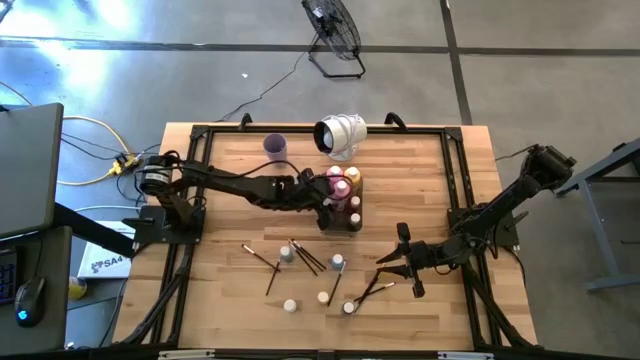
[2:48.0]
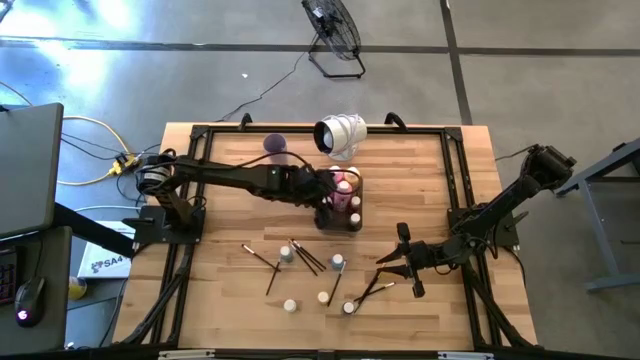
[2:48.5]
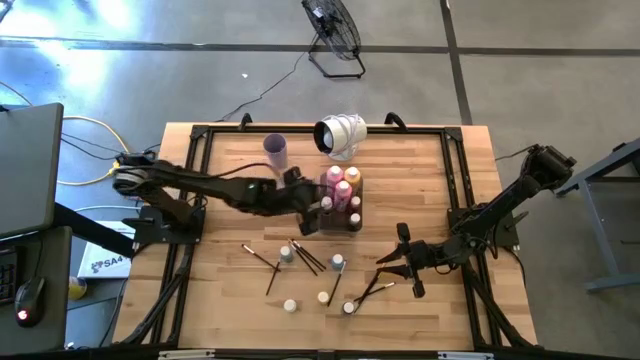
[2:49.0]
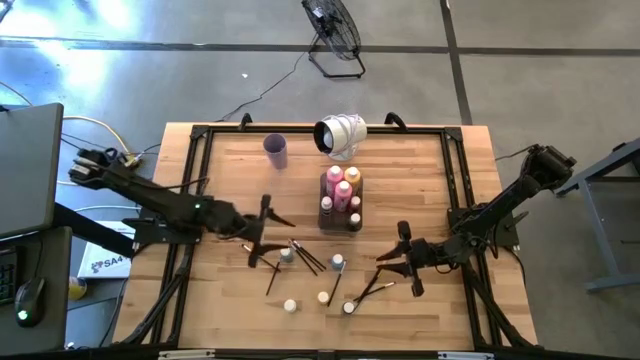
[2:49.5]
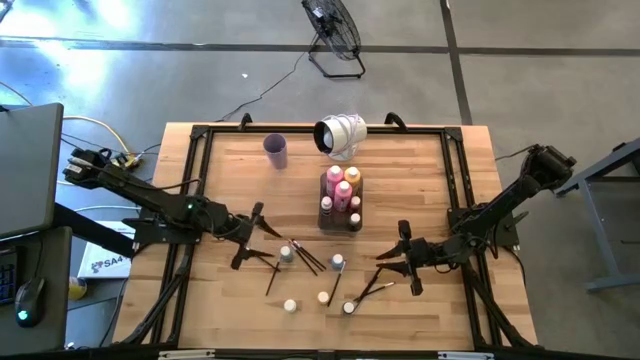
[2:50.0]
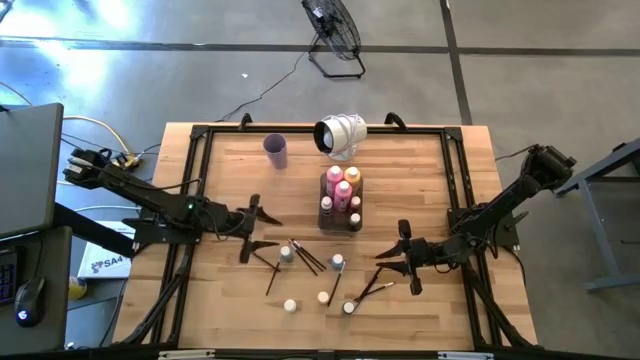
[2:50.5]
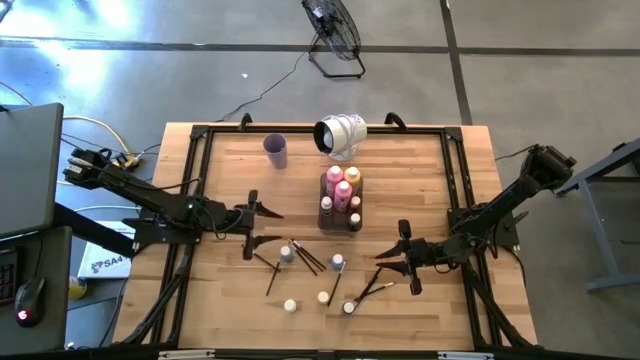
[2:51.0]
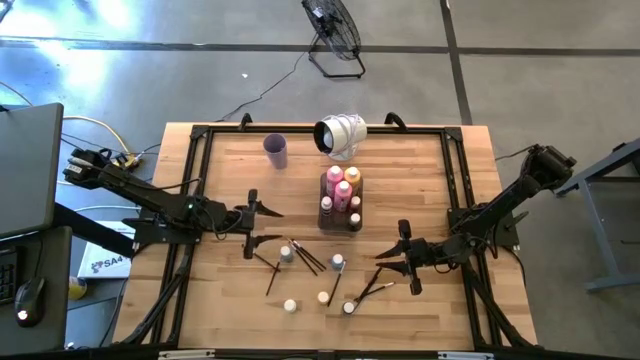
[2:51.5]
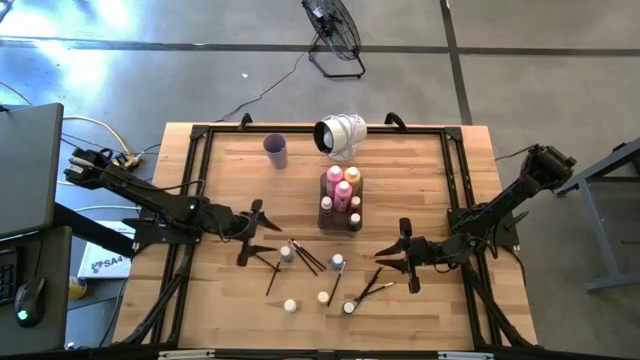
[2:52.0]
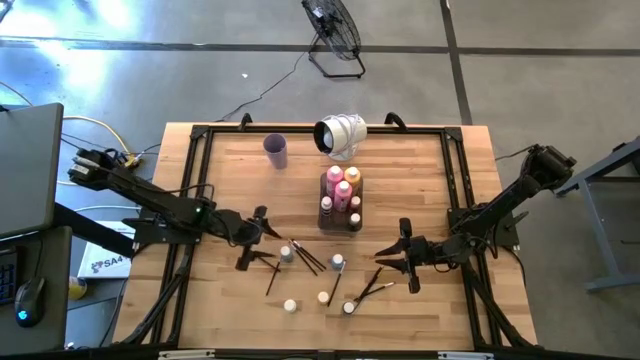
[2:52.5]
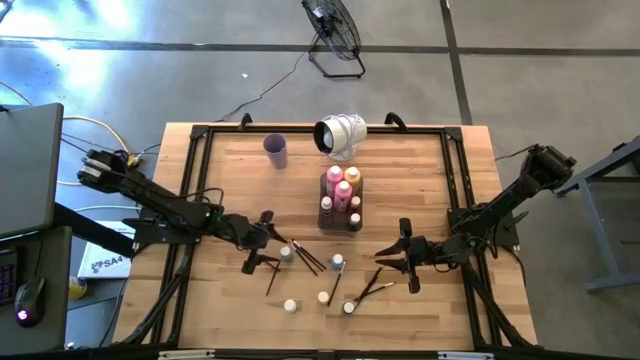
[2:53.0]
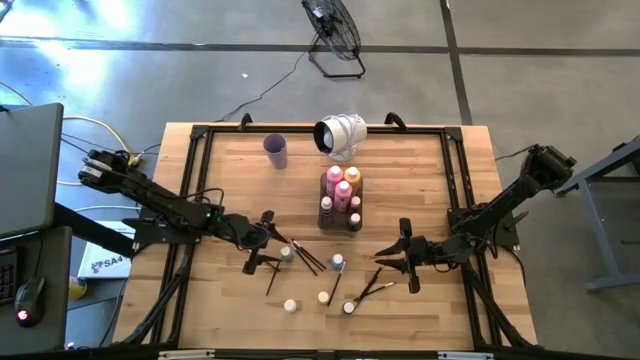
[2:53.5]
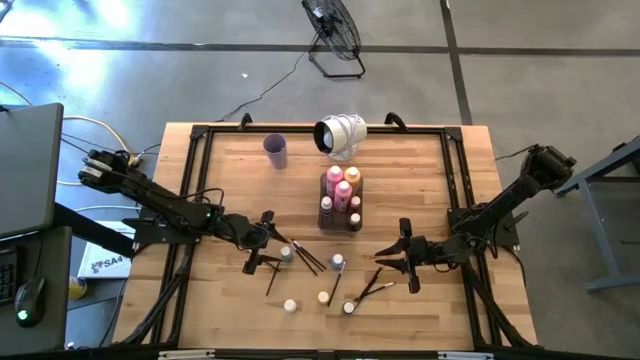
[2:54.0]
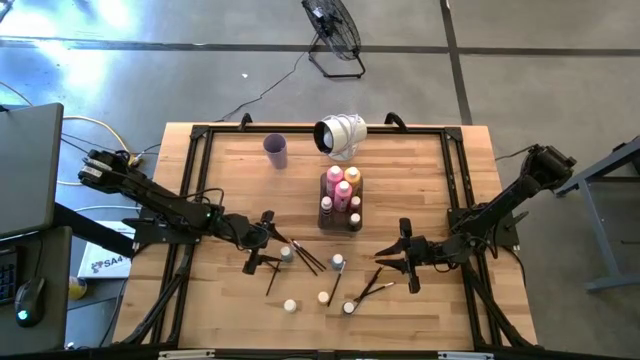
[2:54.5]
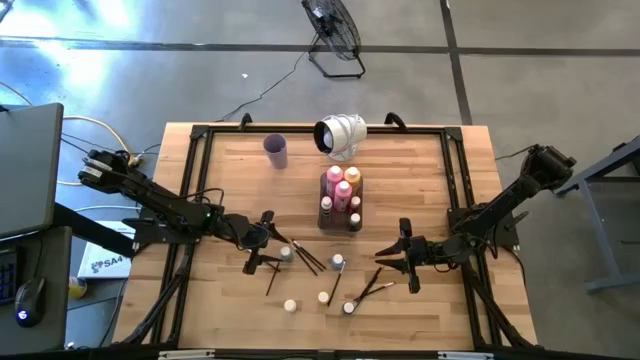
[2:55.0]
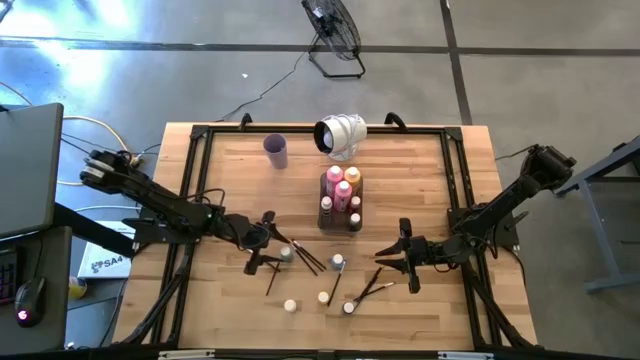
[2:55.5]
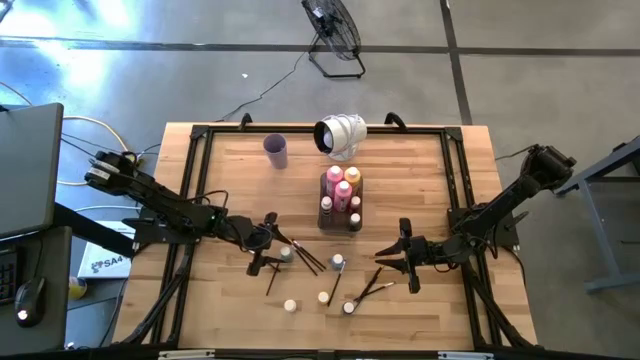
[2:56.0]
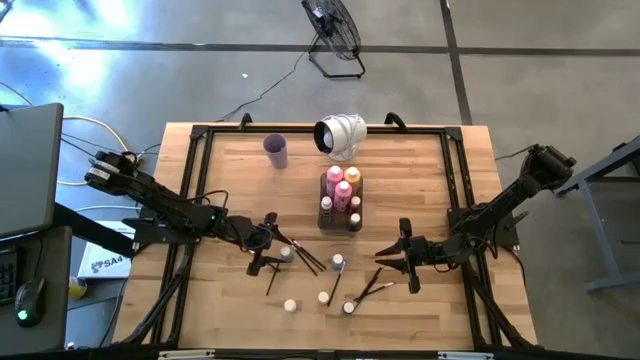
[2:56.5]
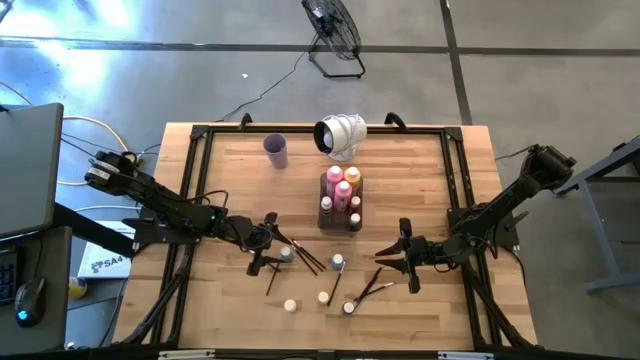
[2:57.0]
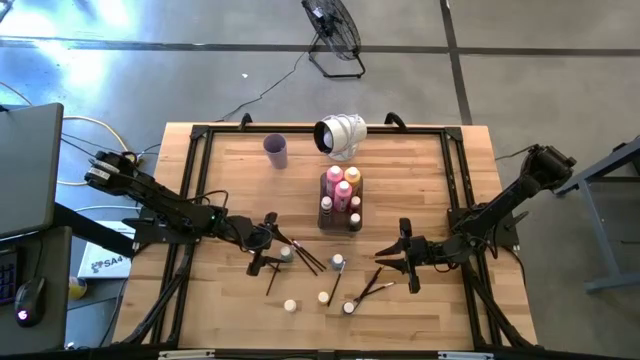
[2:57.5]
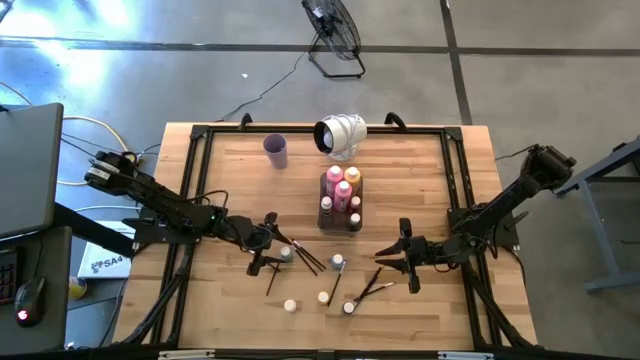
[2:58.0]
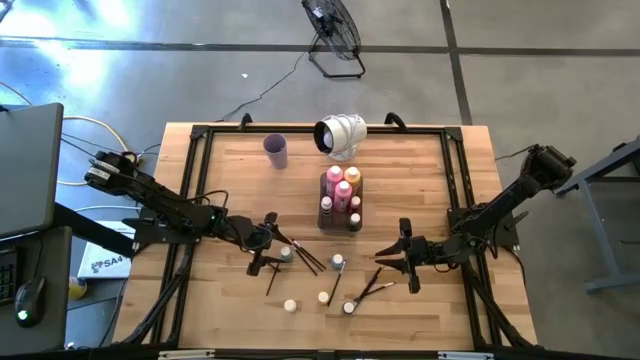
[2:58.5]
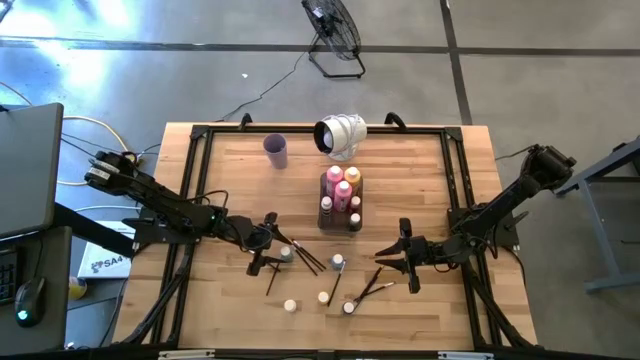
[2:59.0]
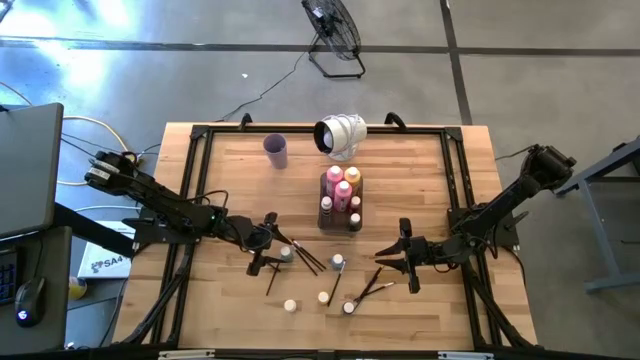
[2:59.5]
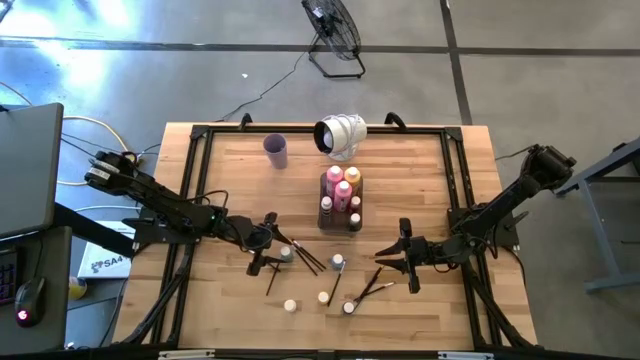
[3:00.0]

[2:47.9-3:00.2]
Task: Pick & Place Paint Supplies
Put the blue paint bottle into the black bin

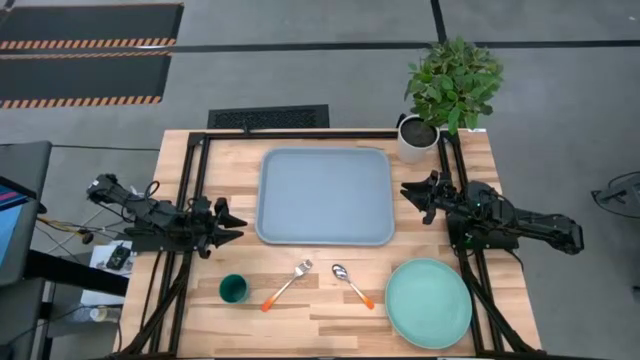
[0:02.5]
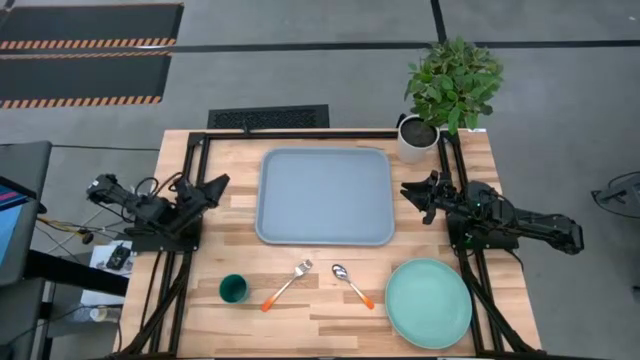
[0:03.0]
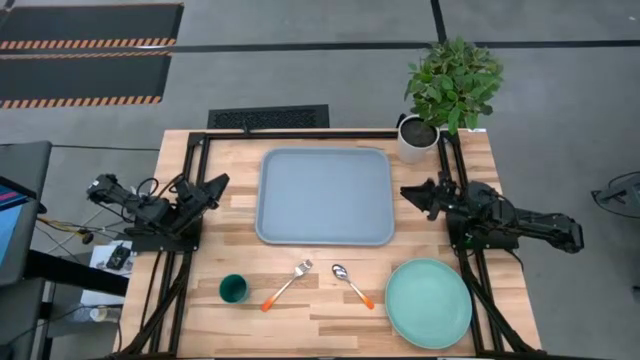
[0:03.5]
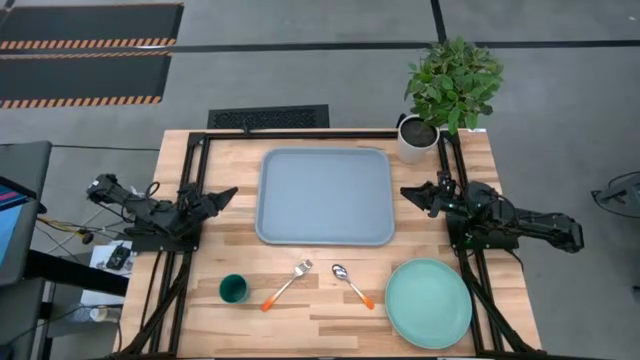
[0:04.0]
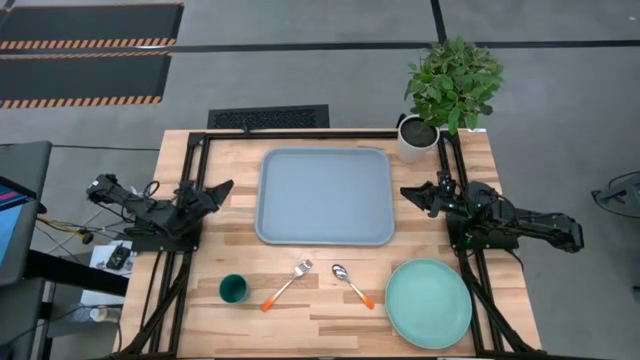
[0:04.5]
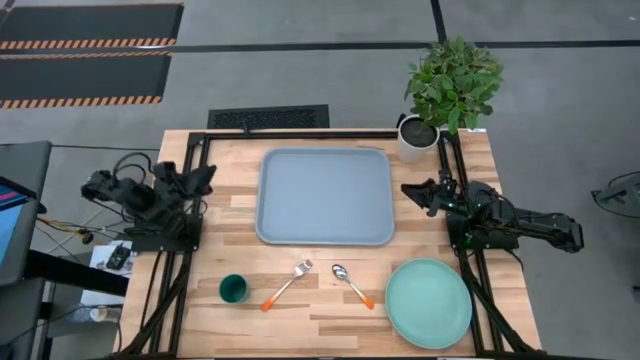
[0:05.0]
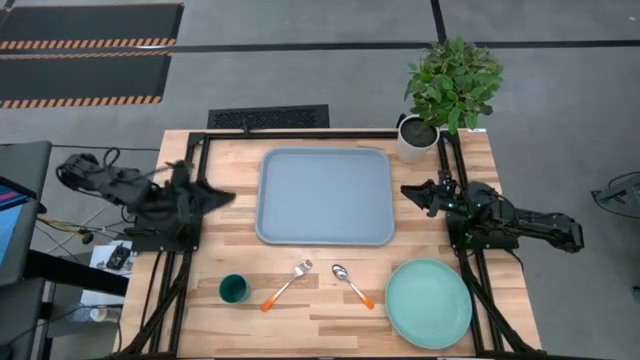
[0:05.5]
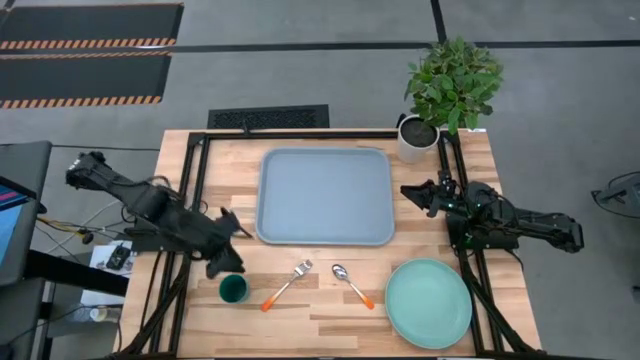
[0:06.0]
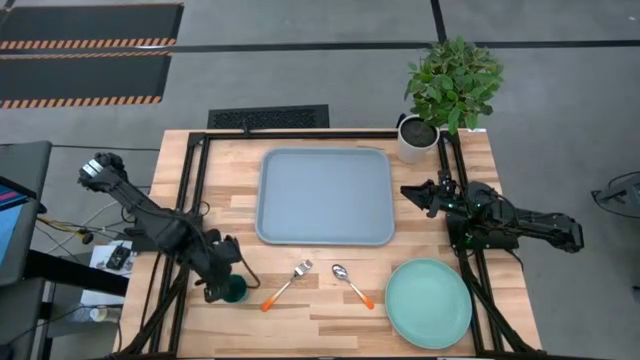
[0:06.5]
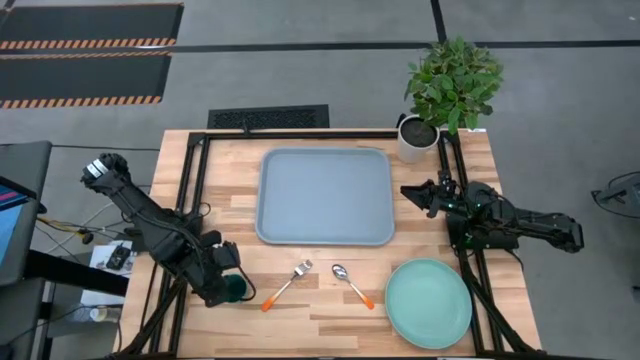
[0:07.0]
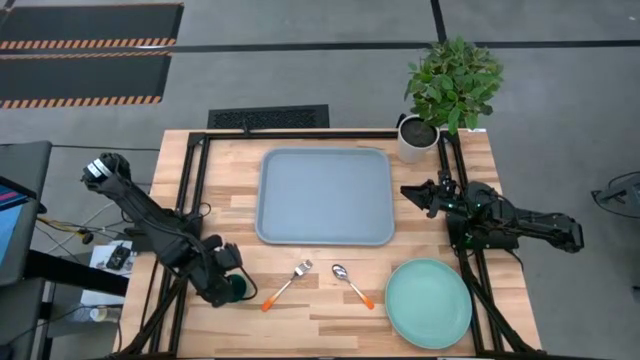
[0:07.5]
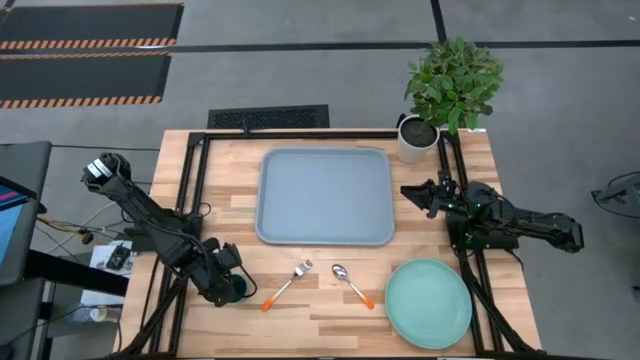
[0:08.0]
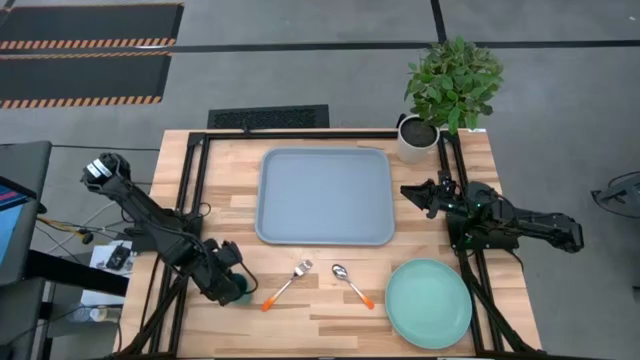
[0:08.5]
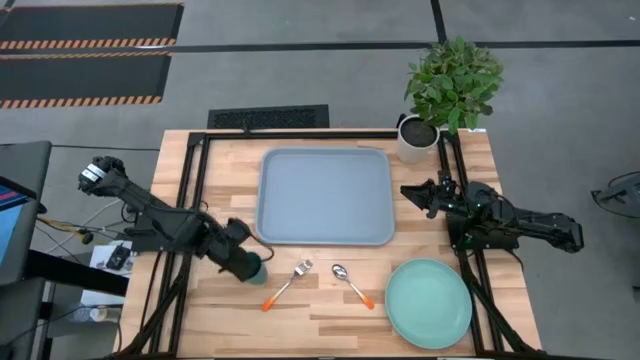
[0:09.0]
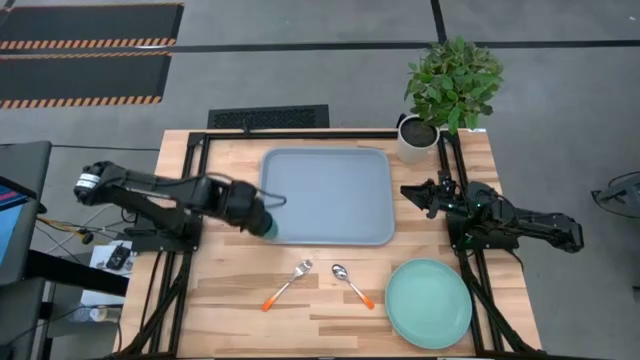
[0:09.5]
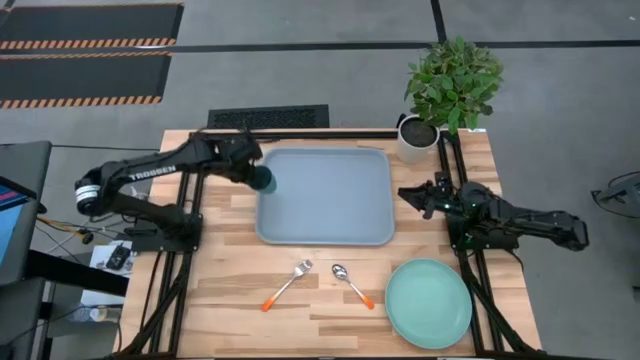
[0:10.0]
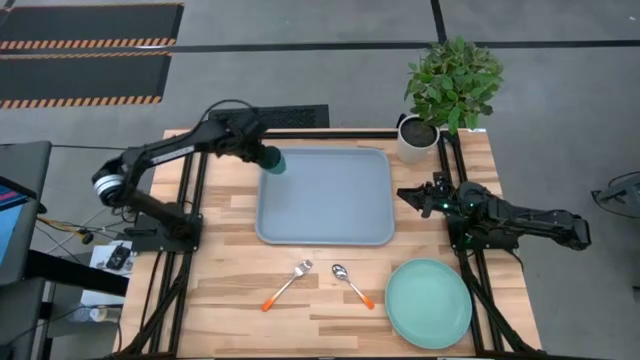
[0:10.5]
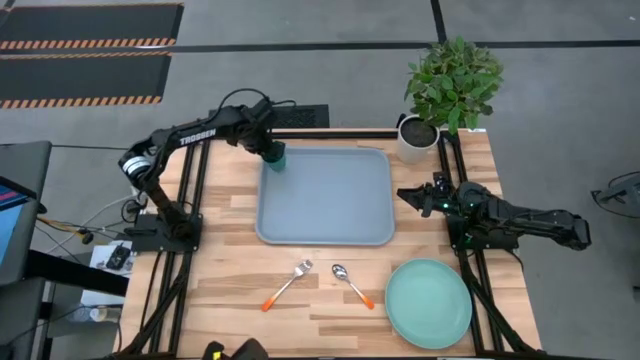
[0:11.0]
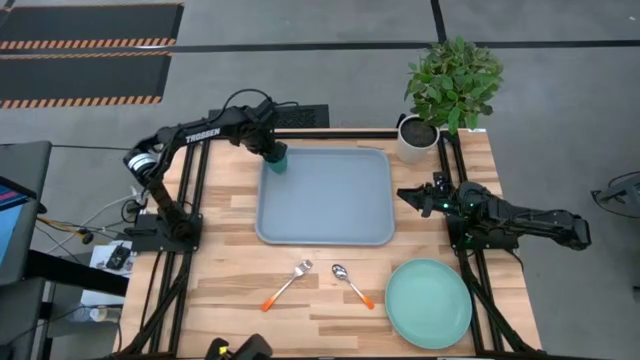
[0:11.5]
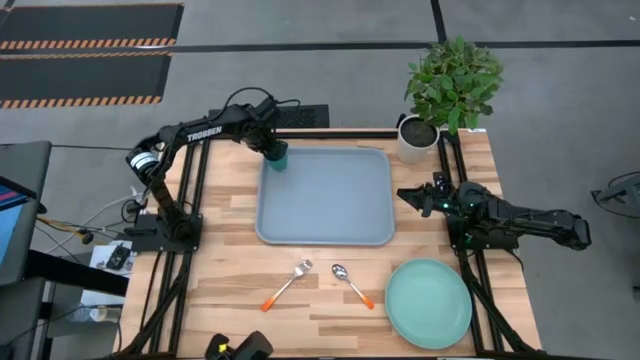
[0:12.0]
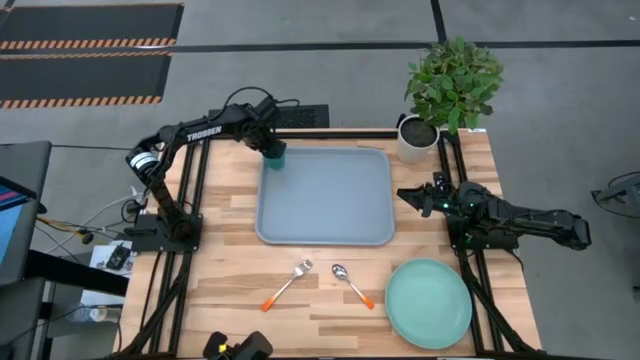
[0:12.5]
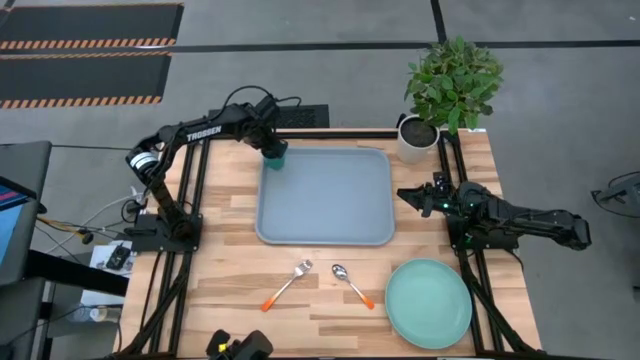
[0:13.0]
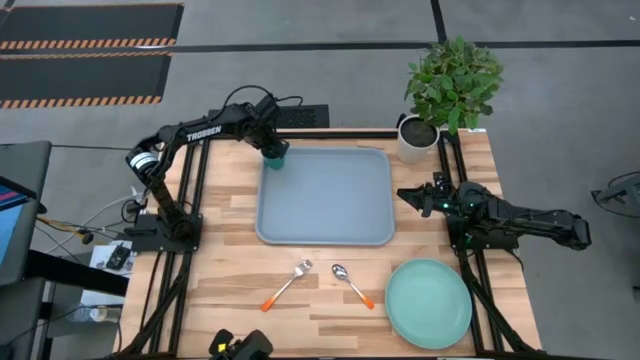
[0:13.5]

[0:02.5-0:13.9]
Task: Pick and place plate/cup/fork/spoon on tray
Put the green cup on the gray tray
